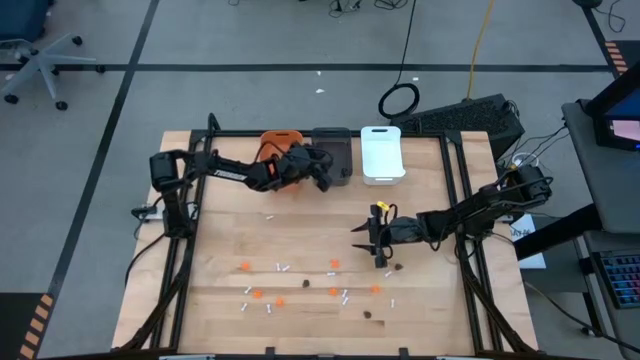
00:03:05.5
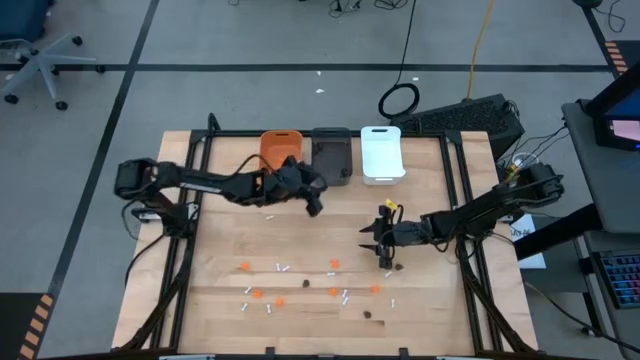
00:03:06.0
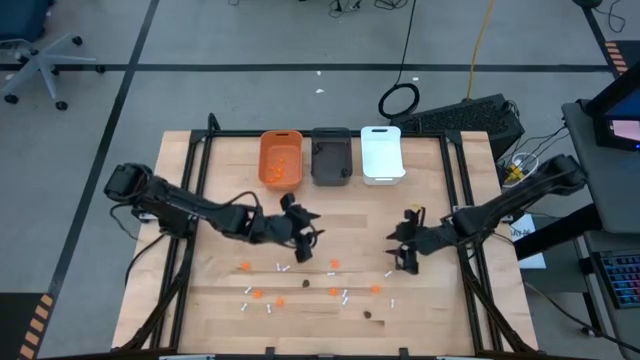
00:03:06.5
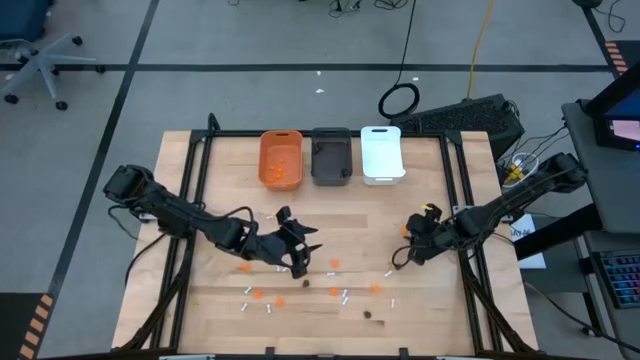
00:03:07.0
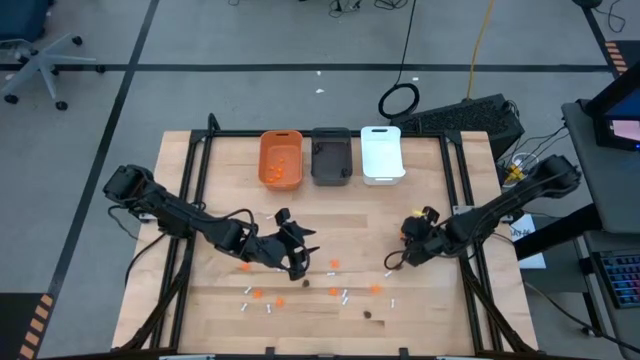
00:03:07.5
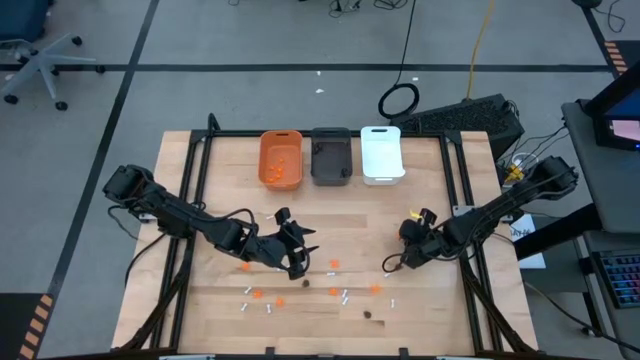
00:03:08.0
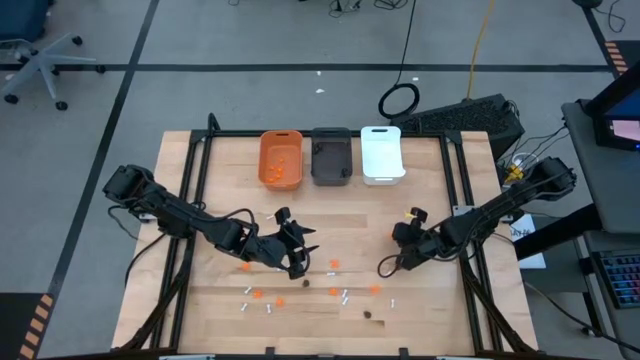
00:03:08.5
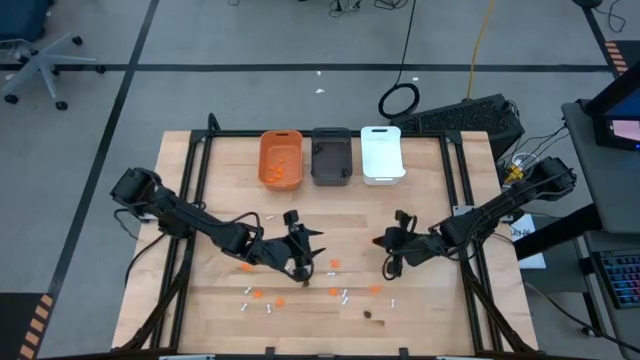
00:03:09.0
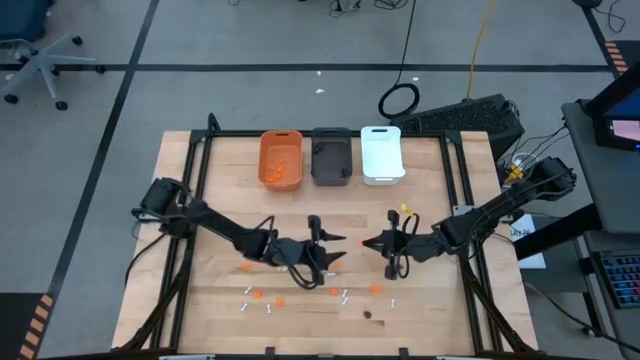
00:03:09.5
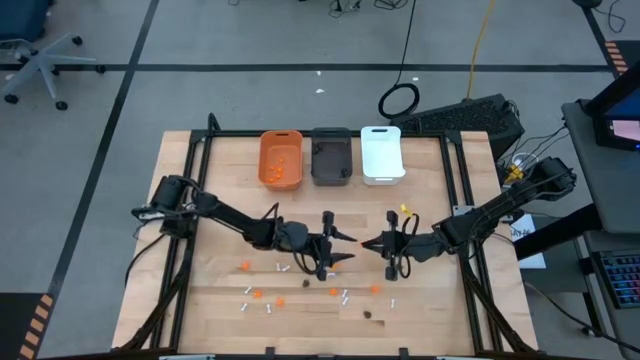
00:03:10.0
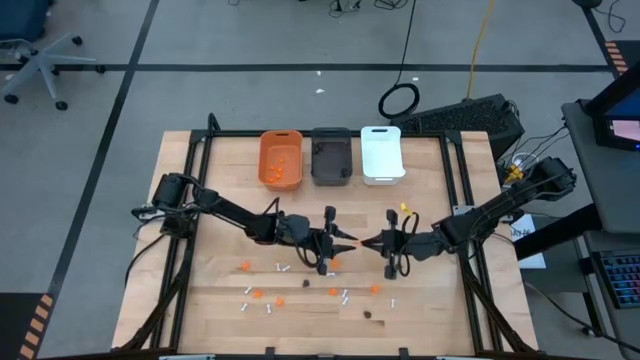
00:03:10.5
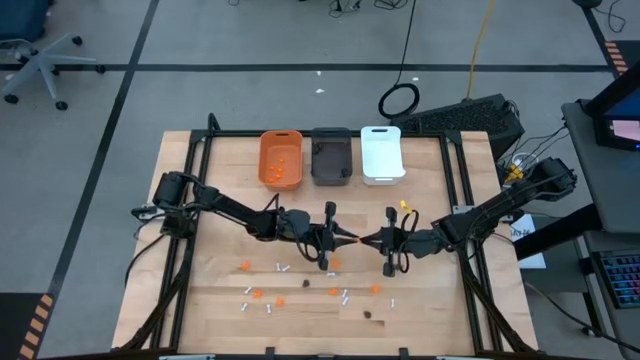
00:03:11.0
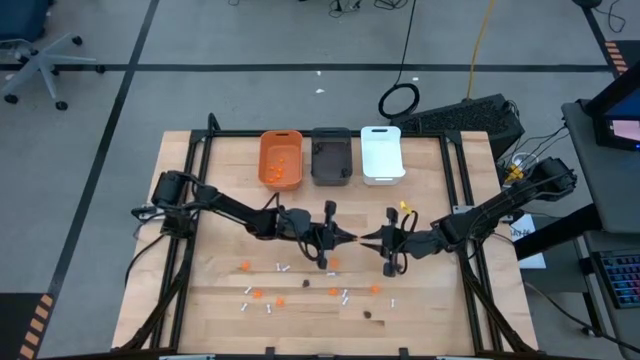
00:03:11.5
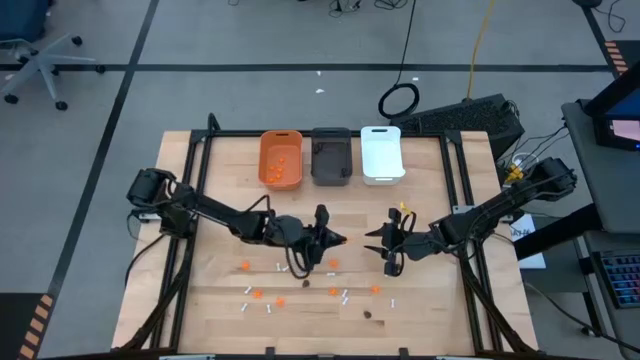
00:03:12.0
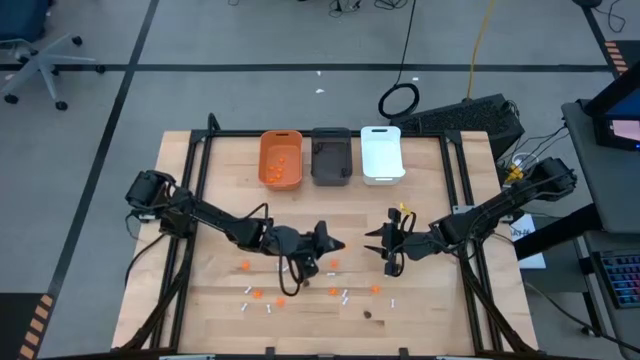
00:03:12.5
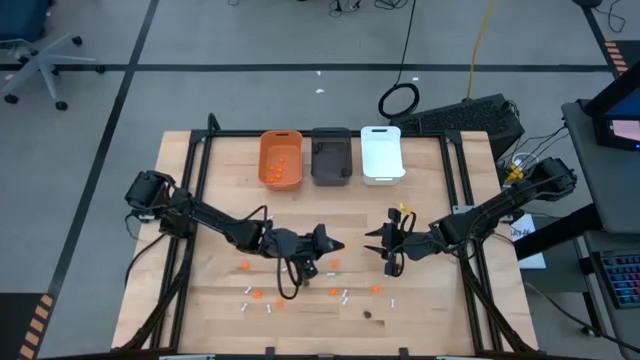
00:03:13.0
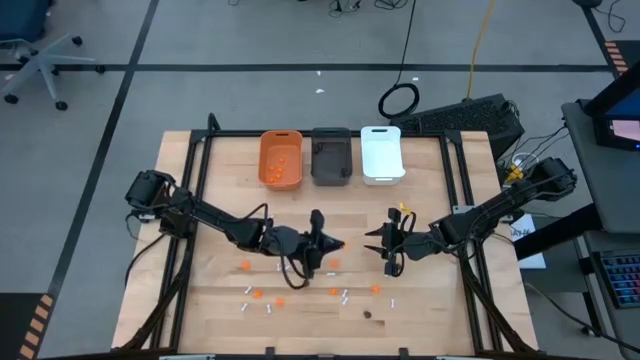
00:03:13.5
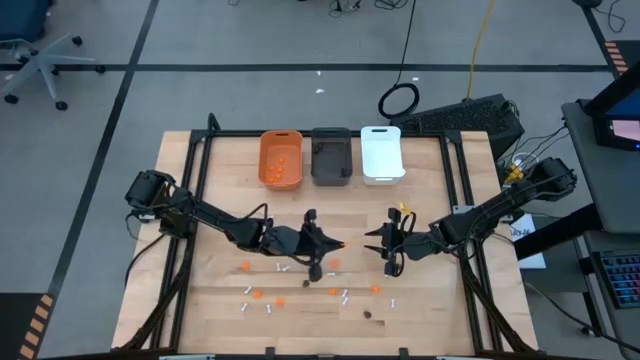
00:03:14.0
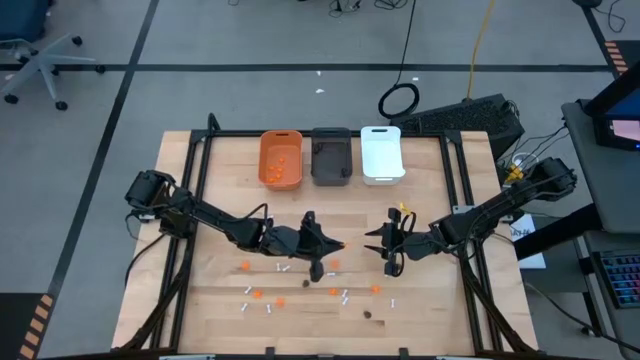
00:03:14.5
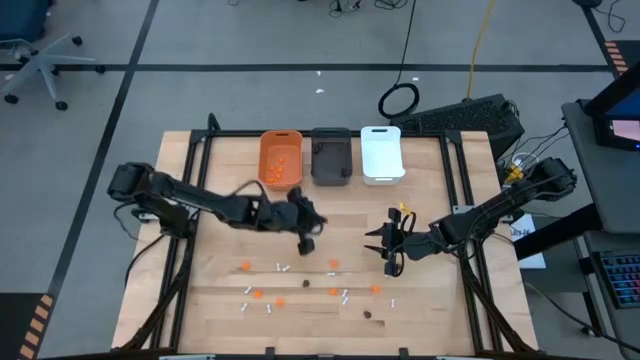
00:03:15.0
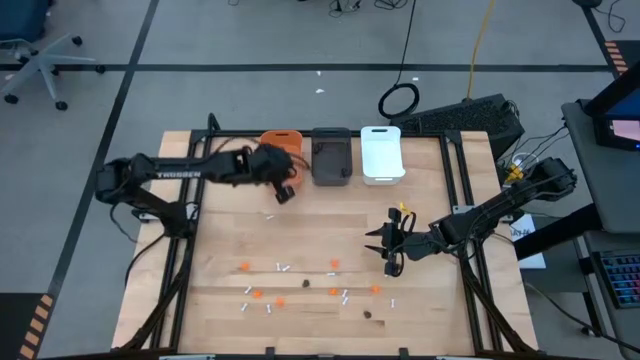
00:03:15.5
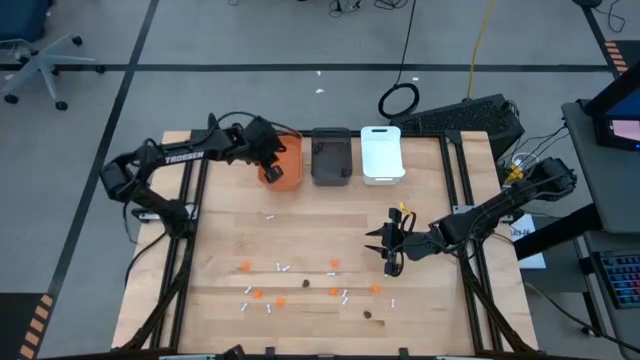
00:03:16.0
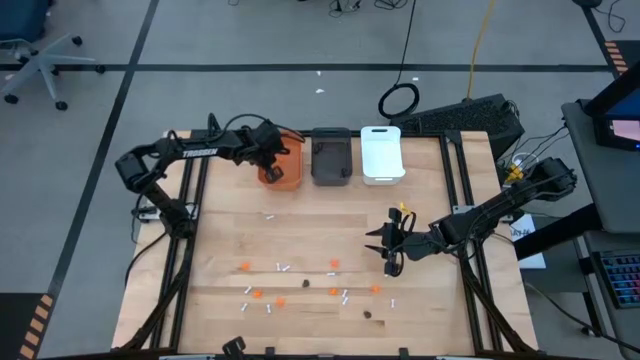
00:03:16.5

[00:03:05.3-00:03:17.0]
Task: Sort Halloween decoration
Put the orange spider toy into the orange bin

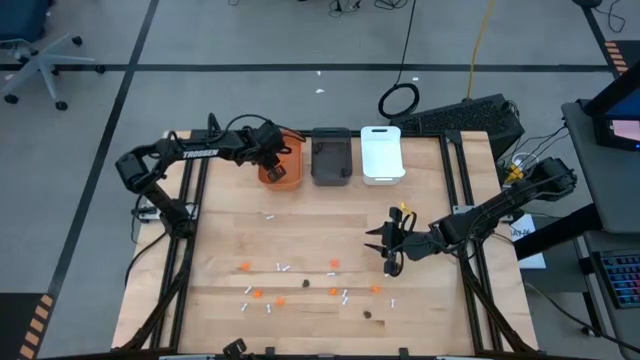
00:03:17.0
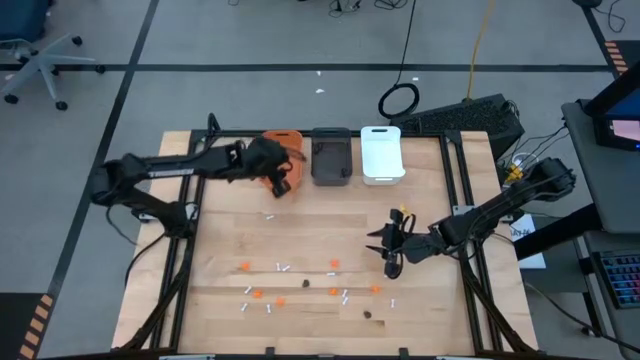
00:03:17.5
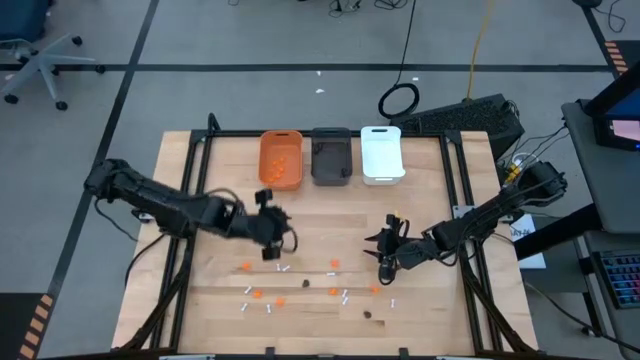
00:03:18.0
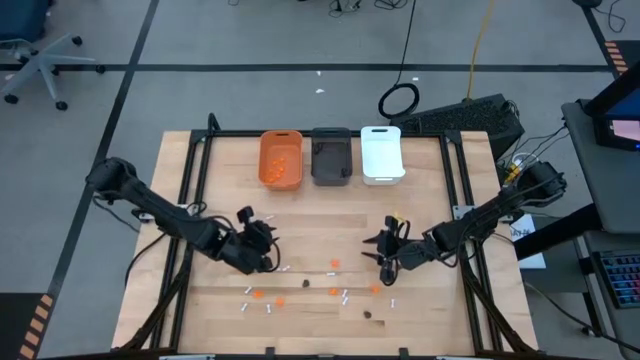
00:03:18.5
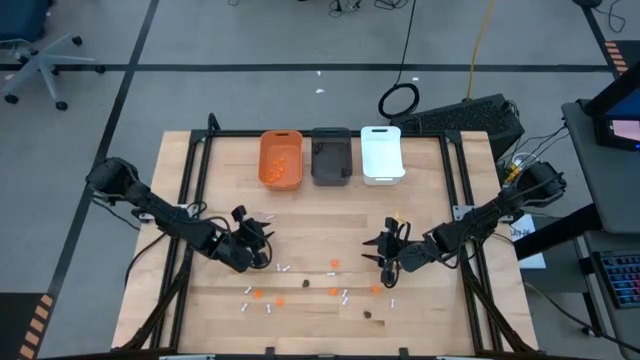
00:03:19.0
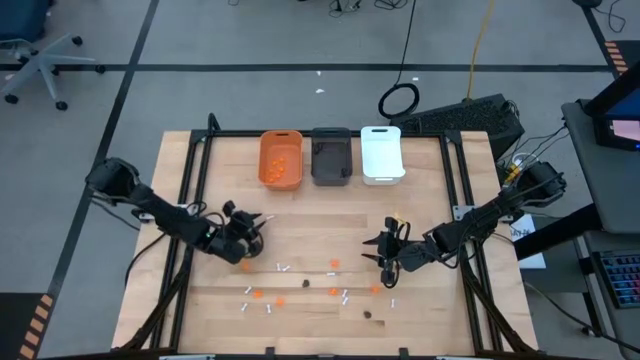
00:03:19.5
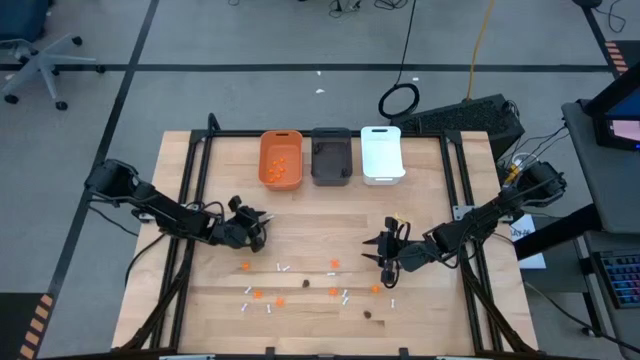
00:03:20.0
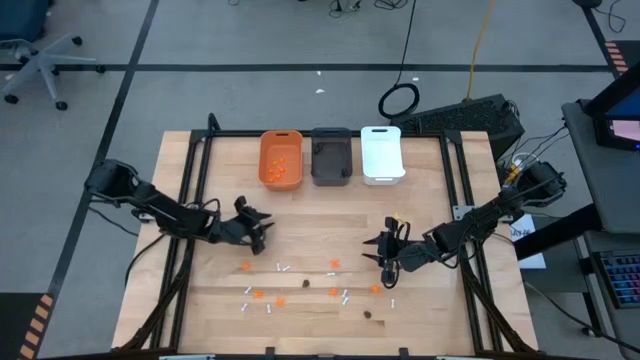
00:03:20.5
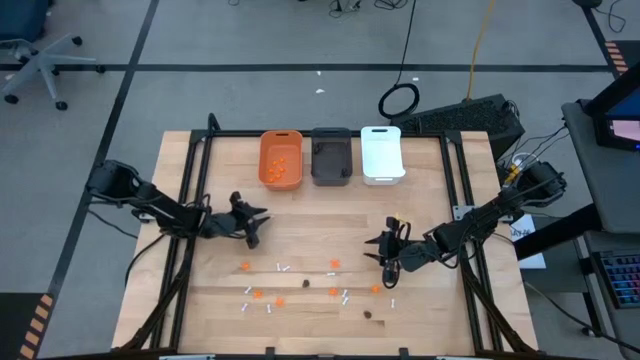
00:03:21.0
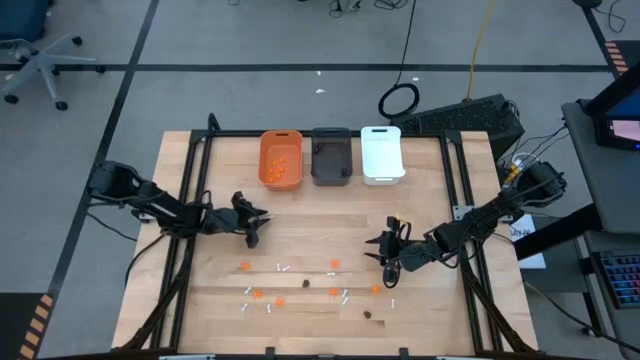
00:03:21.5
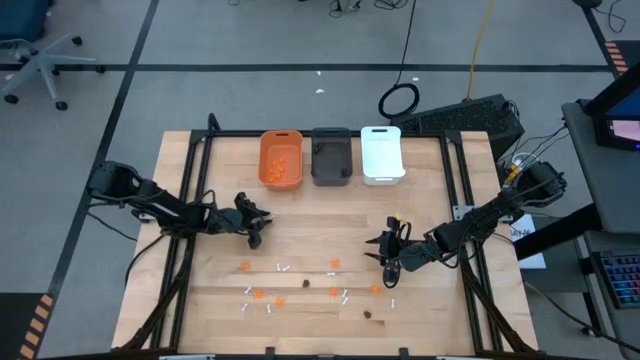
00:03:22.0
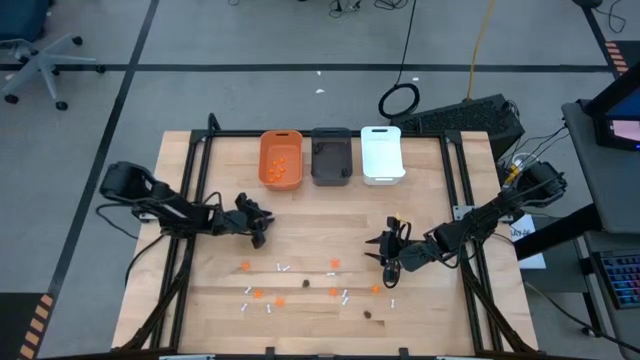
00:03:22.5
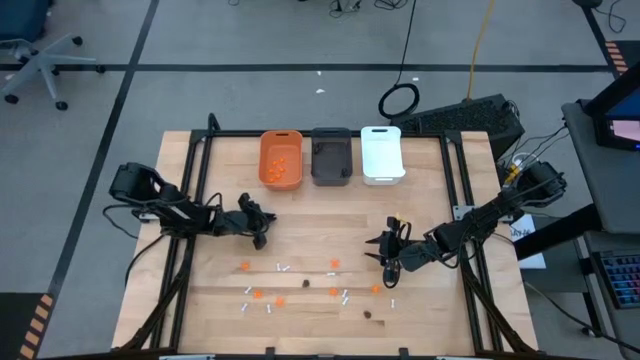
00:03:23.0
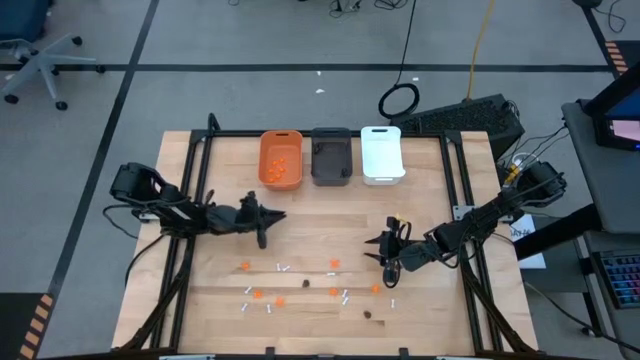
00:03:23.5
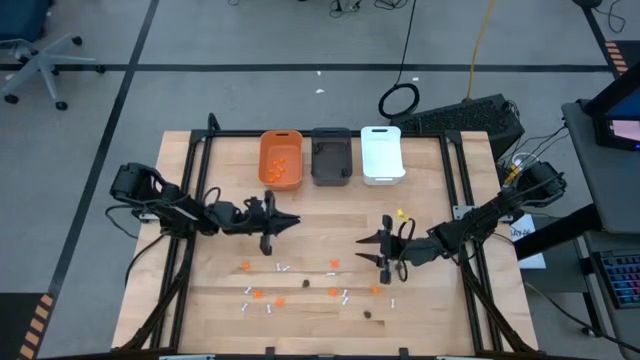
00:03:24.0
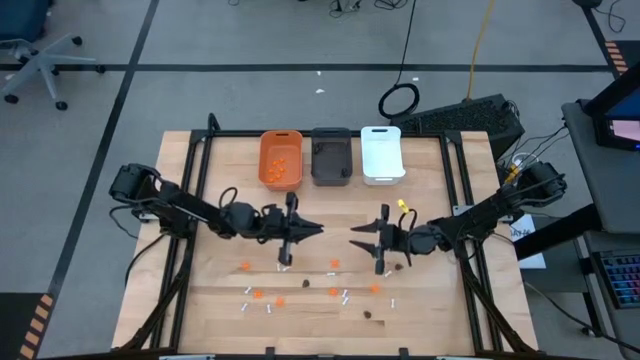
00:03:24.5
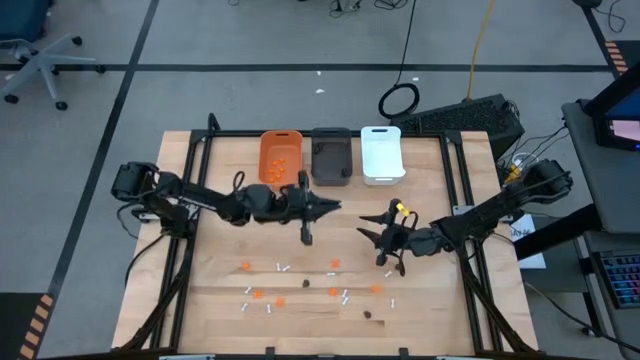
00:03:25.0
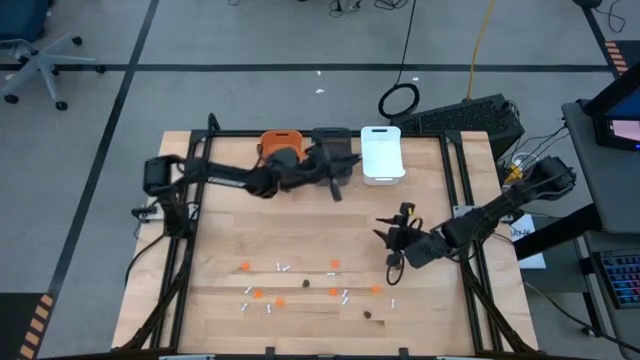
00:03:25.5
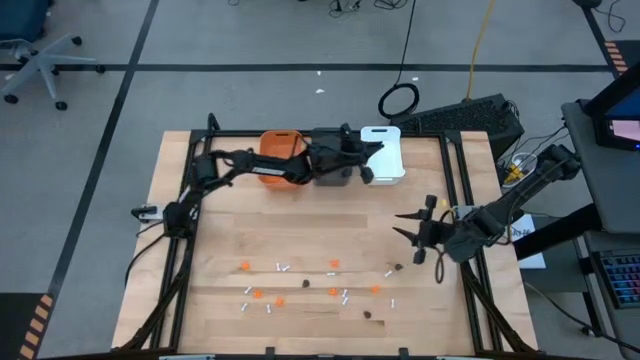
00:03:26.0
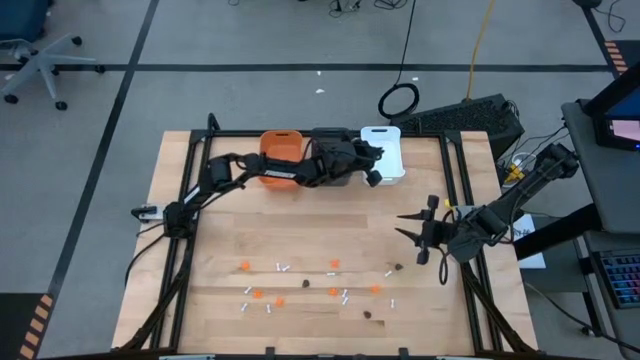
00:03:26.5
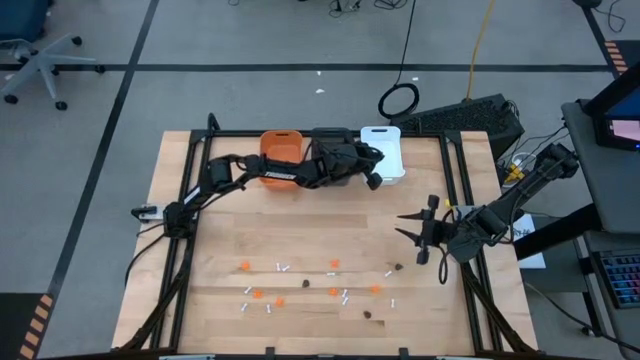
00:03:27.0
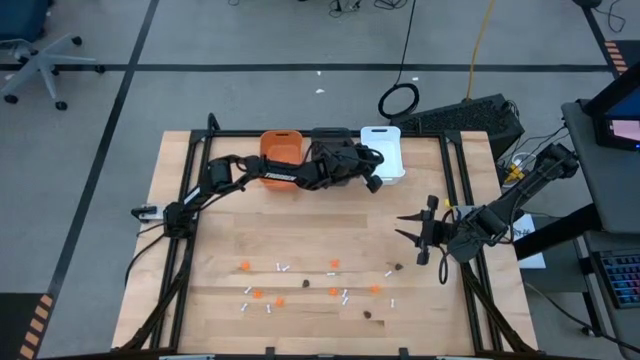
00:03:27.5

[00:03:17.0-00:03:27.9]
Put the white bone toy into the white bin
